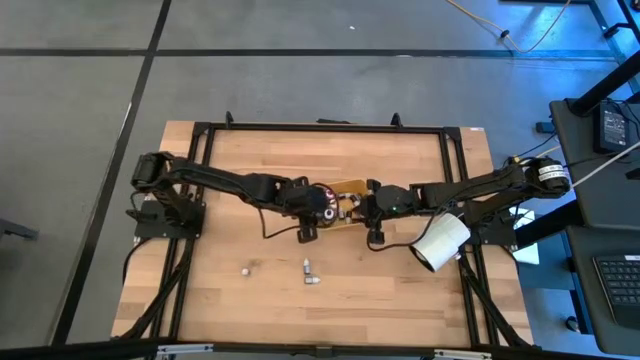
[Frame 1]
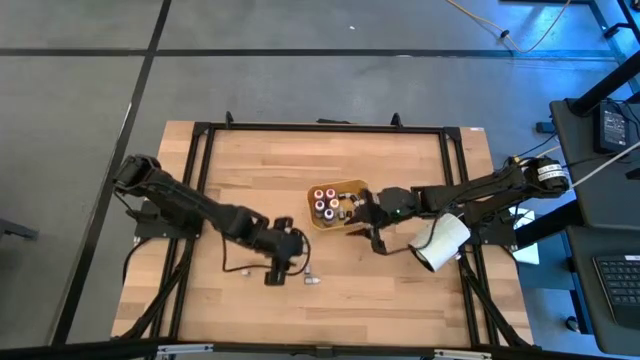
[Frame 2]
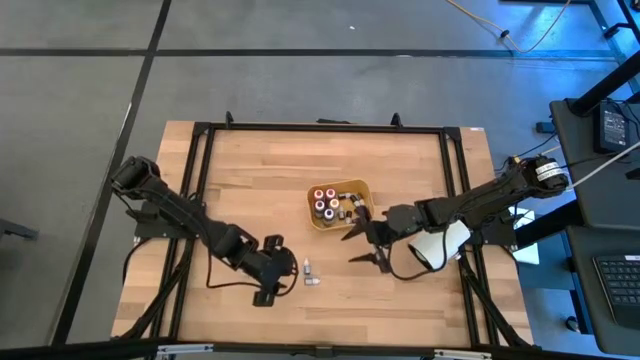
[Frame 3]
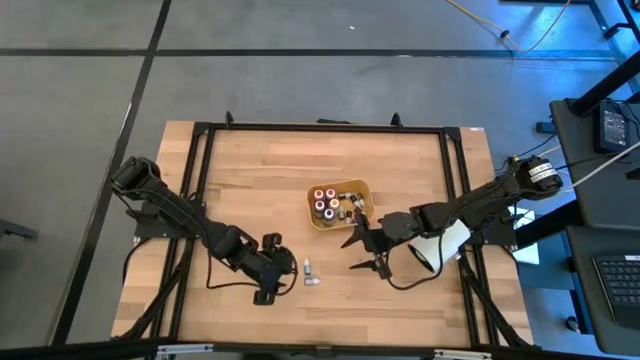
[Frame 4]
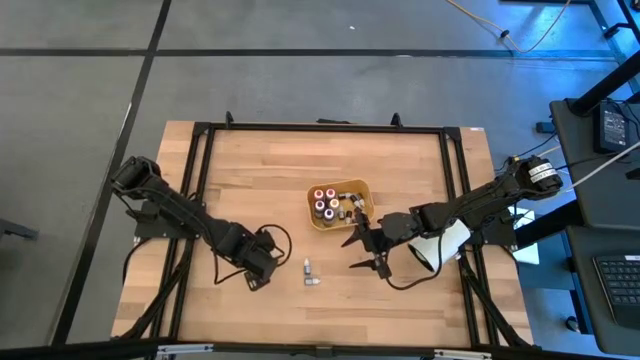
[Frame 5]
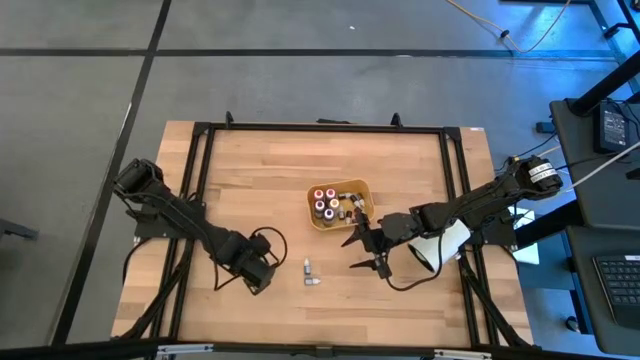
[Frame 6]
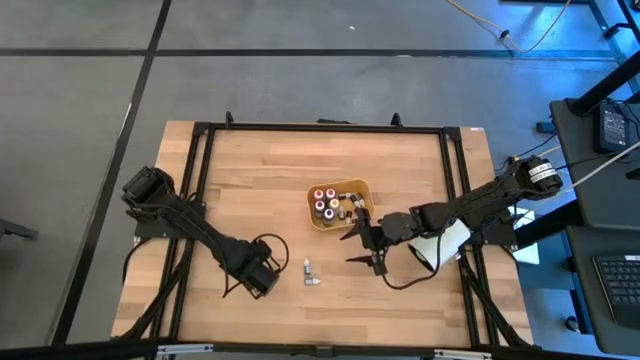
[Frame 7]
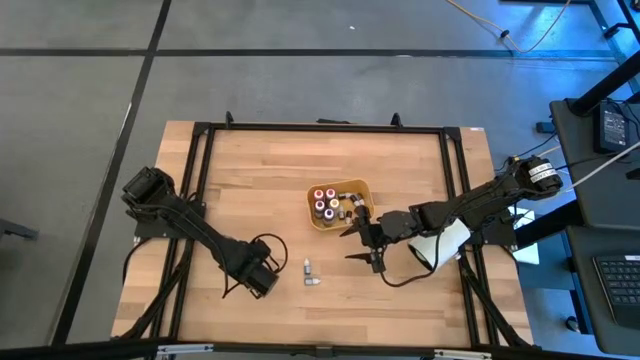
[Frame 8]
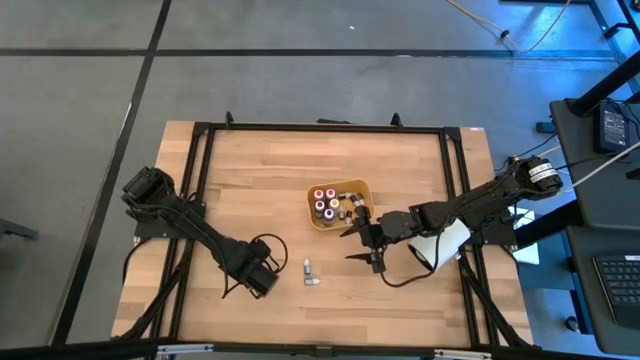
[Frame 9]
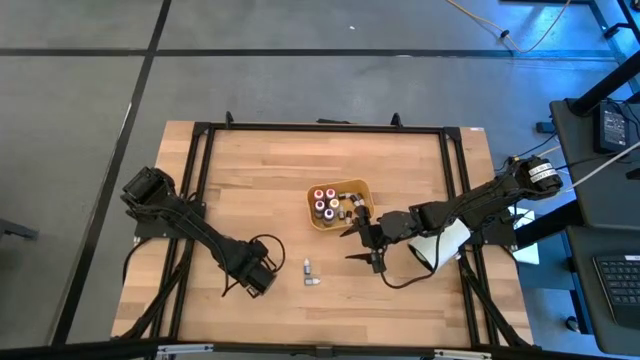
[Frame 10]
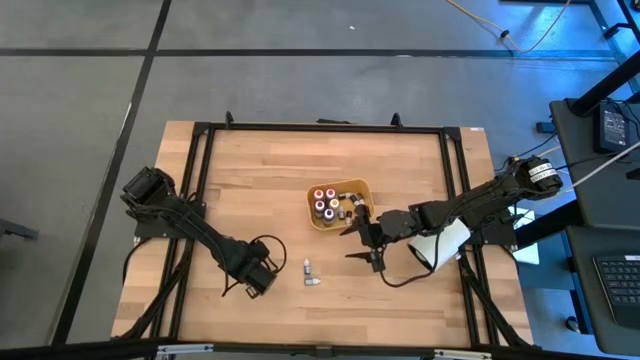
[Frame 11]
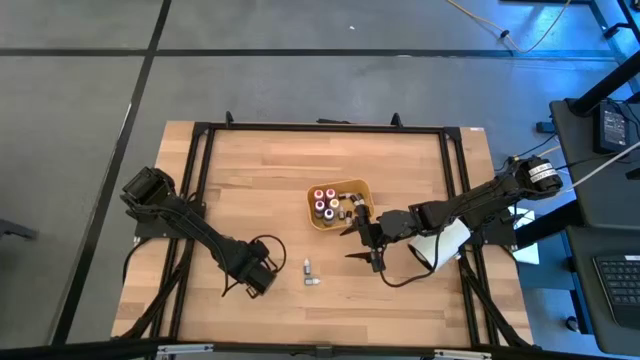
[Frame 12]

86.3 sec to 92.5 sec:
Task: Pick & Place food coloring
Put the small black food coloring bottle into the yellow bin

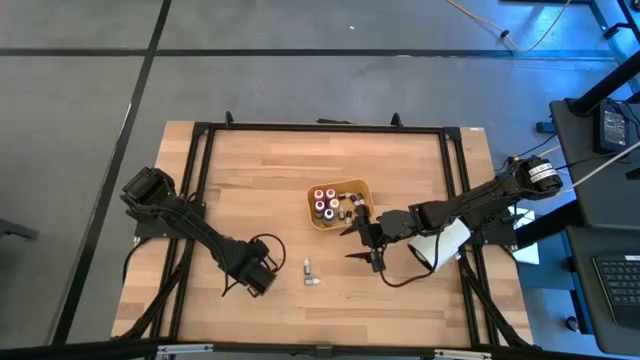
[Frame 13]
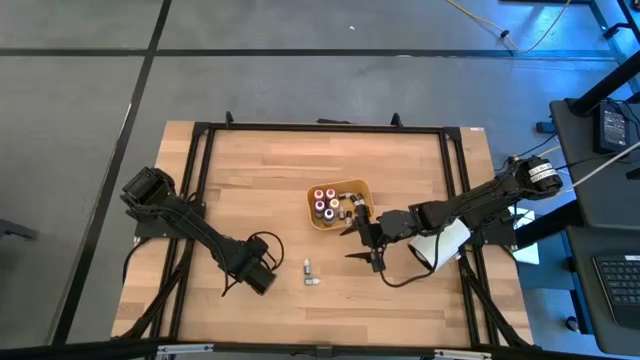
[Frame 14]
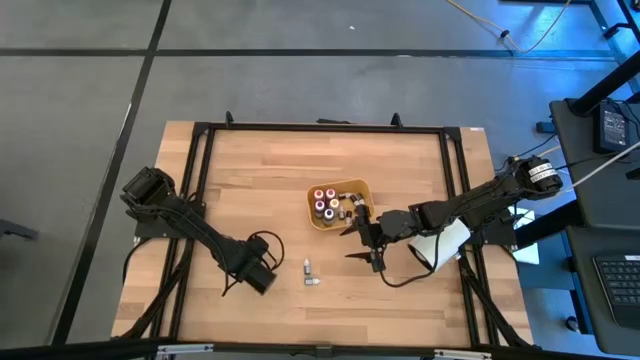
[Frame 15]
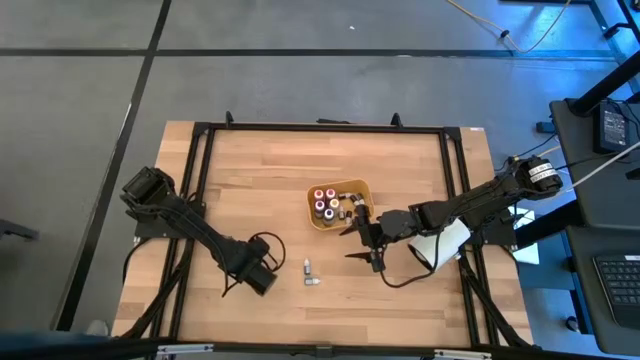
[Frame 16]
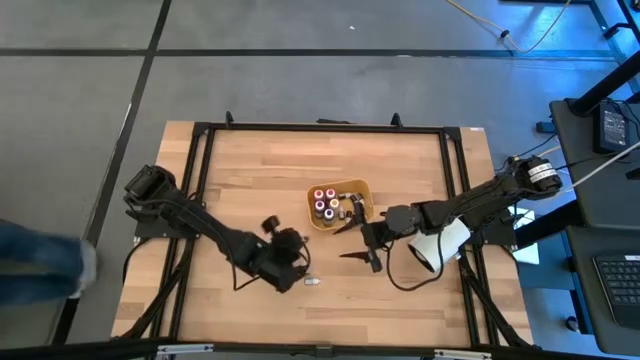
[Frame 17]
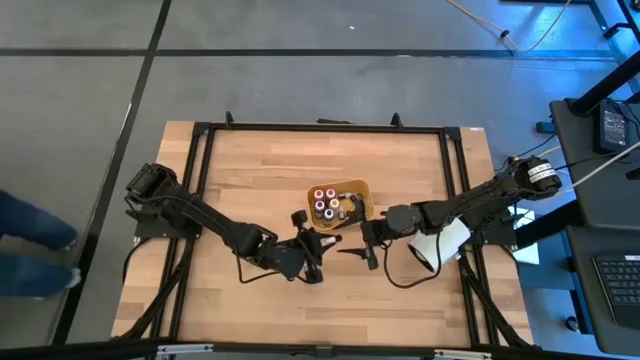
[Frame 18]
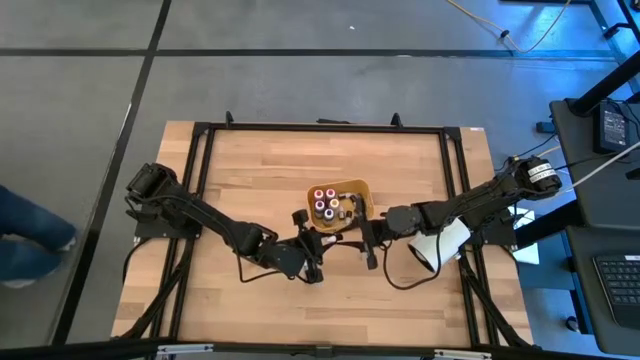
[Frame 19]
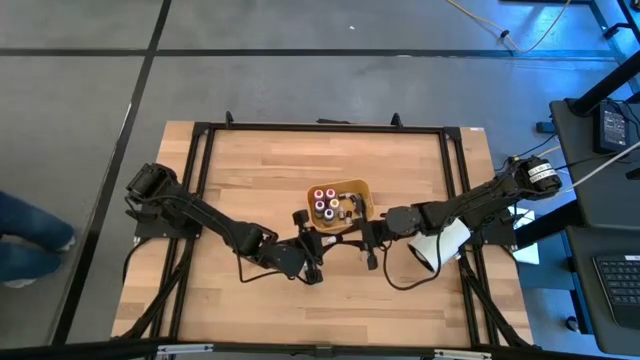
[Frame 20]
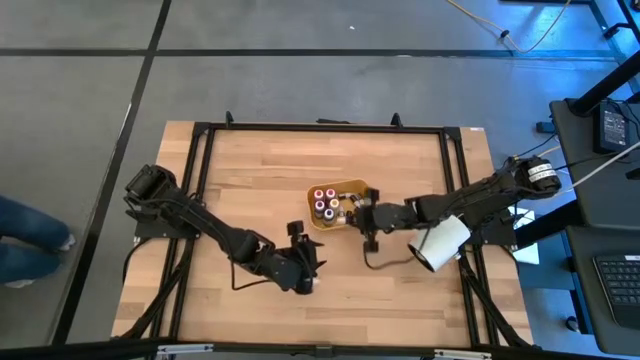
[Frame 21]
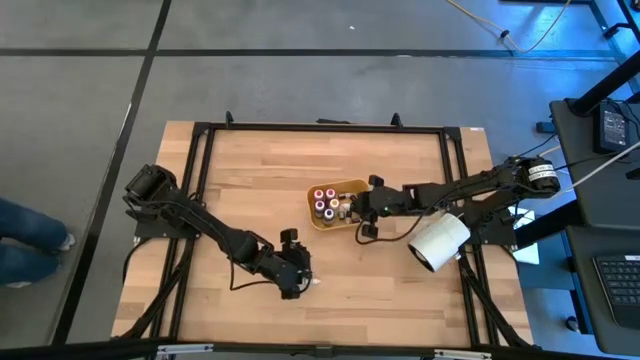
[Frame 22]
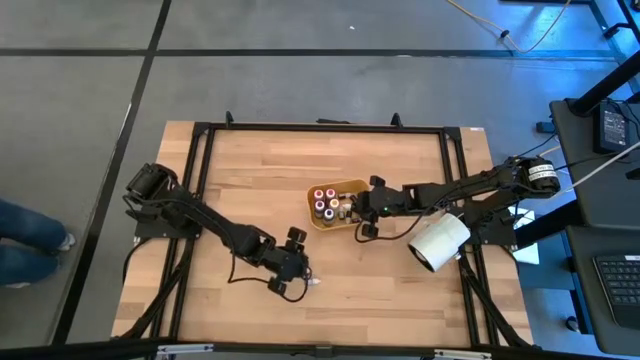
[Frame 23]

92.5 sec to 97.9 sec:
Put the small red food coloring bottle into the yellow bin

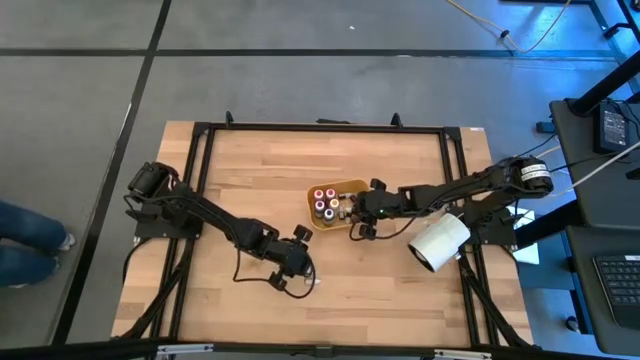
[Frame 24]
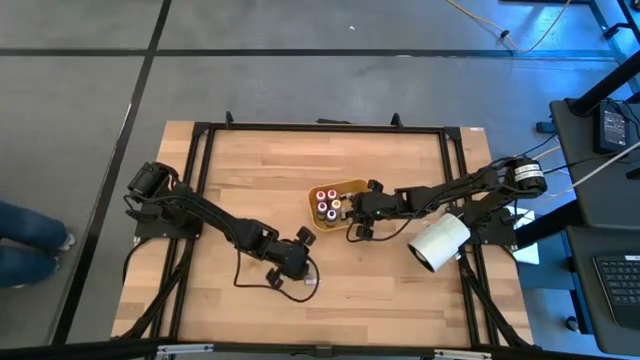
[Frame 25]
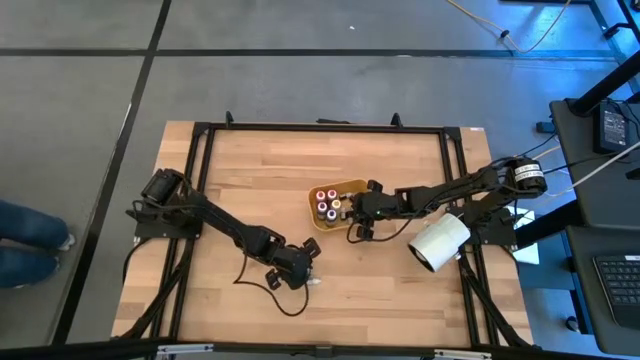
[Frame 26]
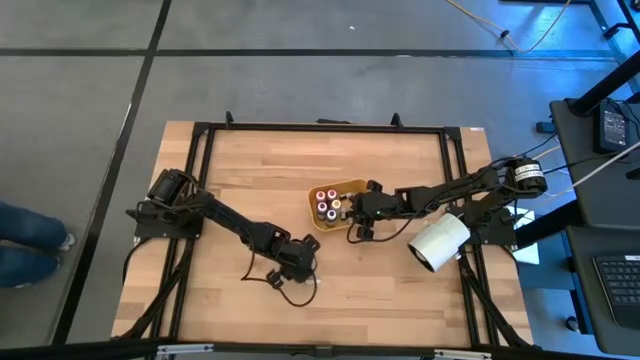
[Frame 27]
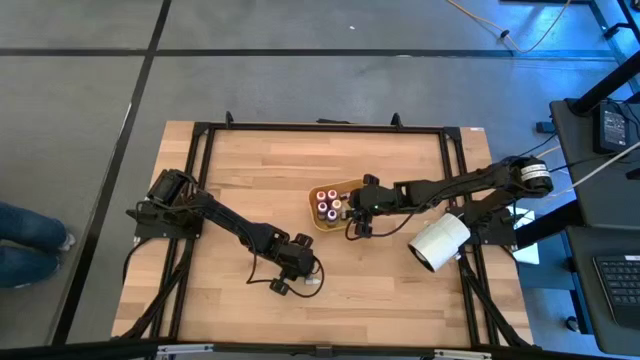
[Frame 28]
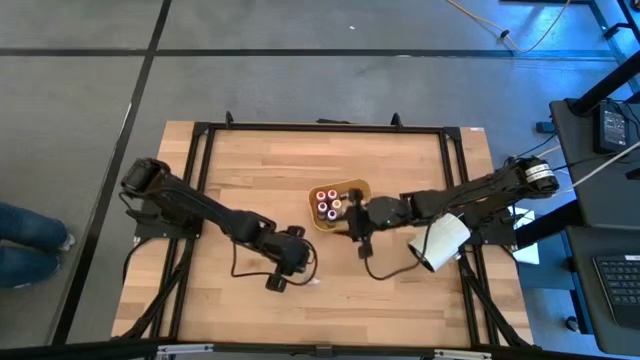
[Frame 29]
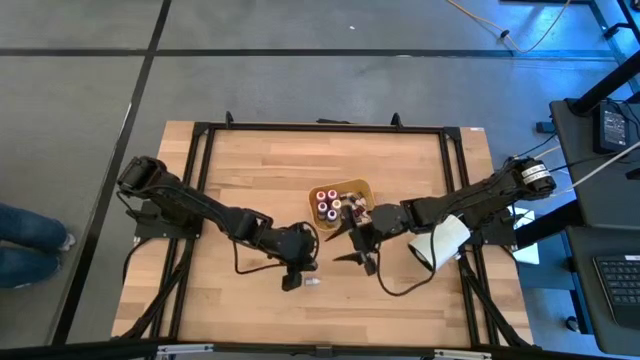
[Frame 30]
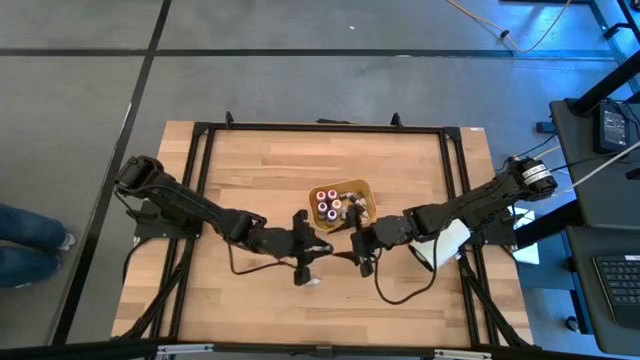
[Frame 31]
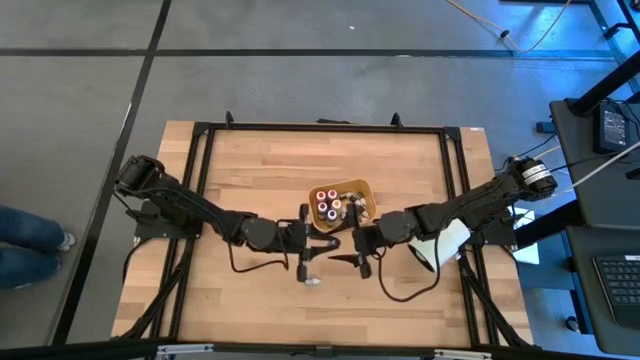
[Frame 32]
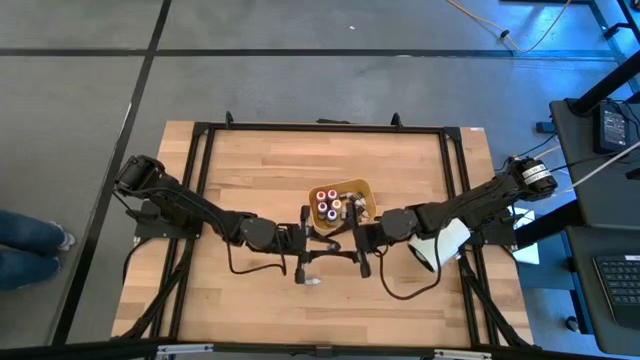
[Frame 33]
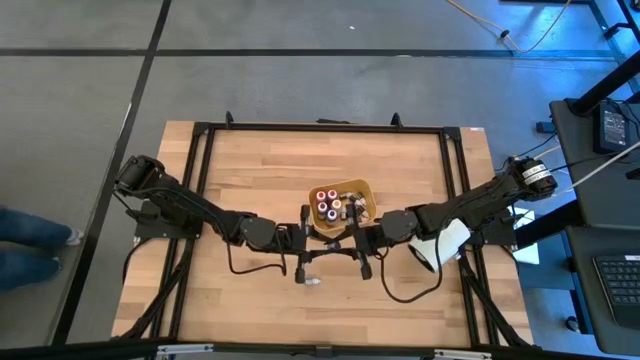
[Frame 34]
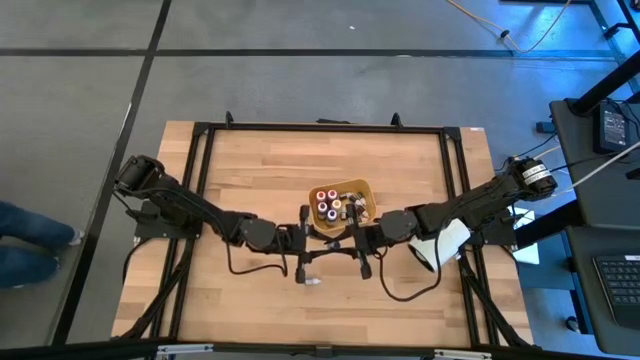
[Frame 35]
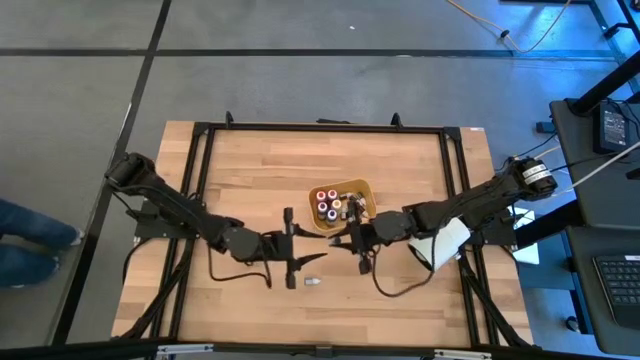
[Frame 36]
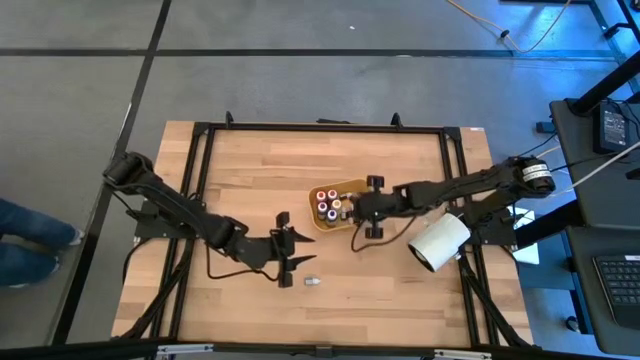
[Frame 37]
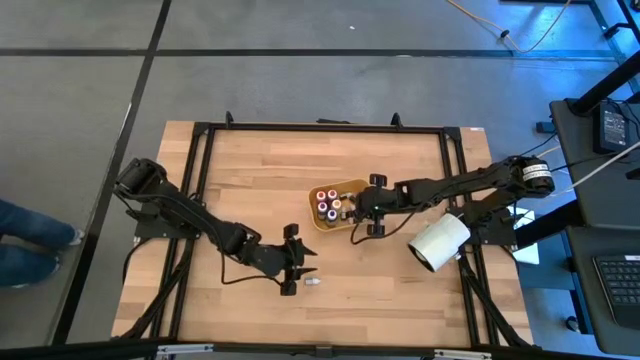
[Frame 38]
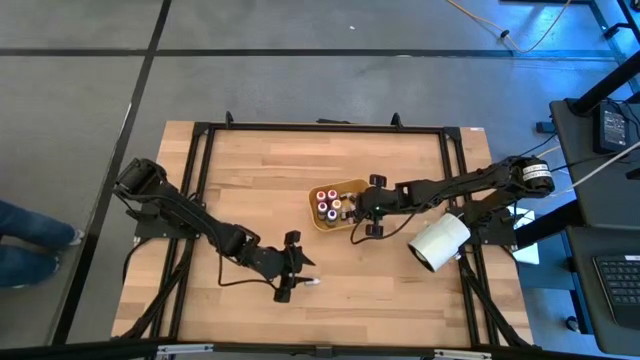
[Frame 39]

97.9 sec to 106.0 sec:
Put the small blue food coloring bottle into the yellow bin

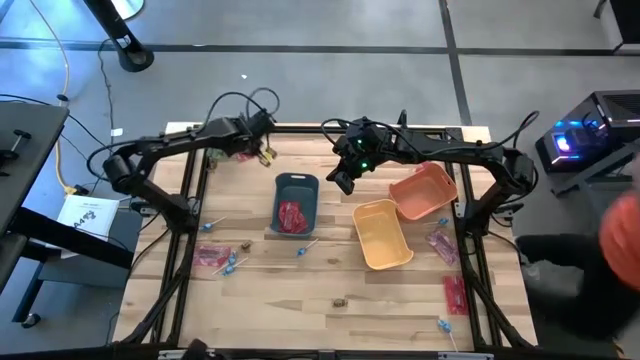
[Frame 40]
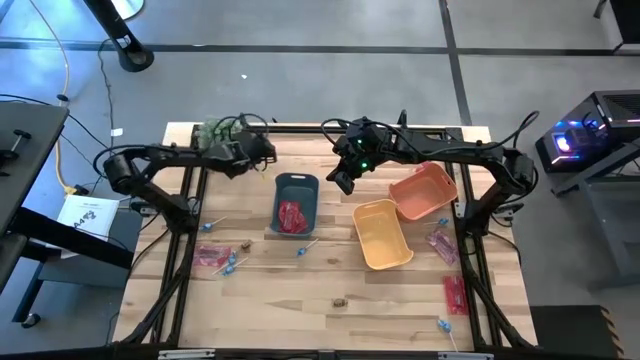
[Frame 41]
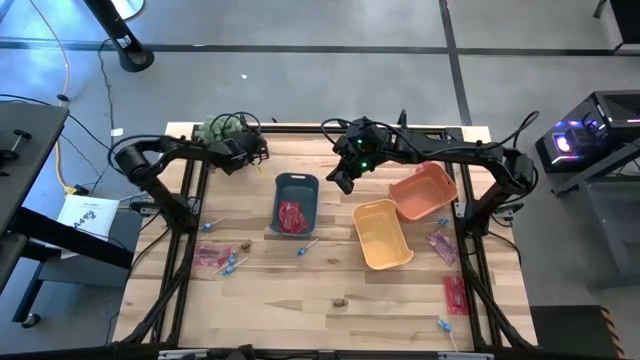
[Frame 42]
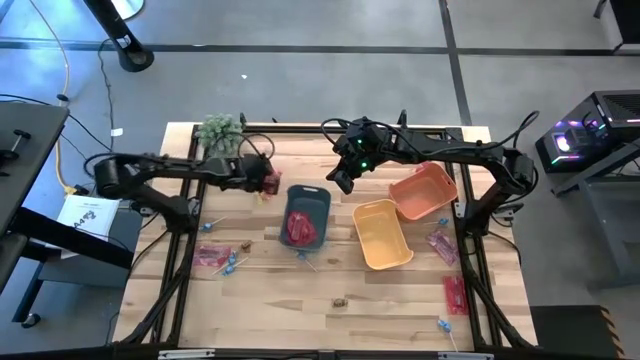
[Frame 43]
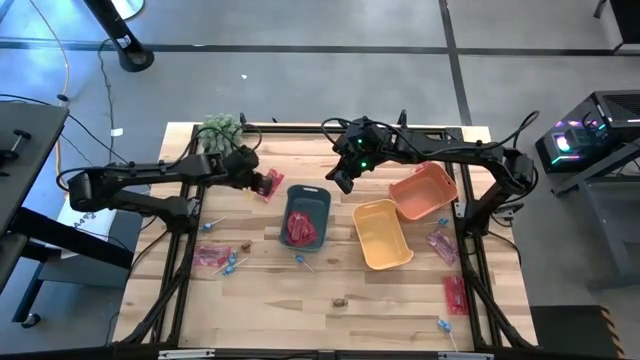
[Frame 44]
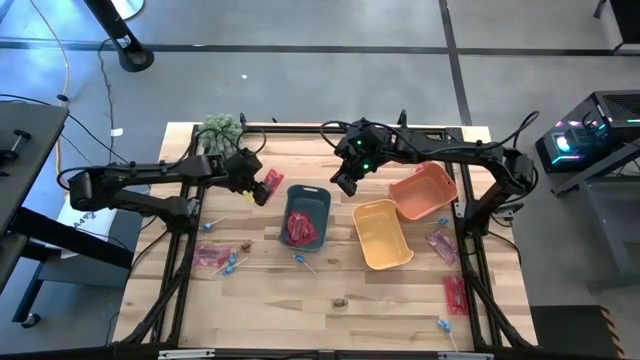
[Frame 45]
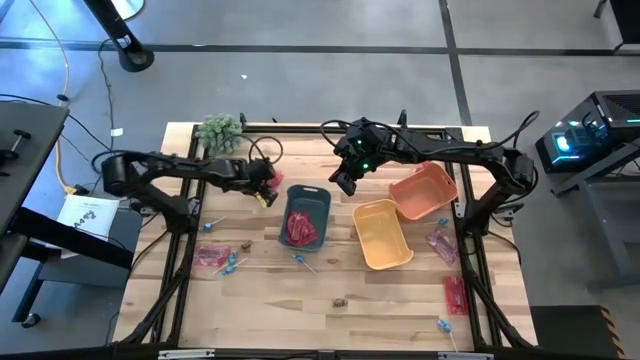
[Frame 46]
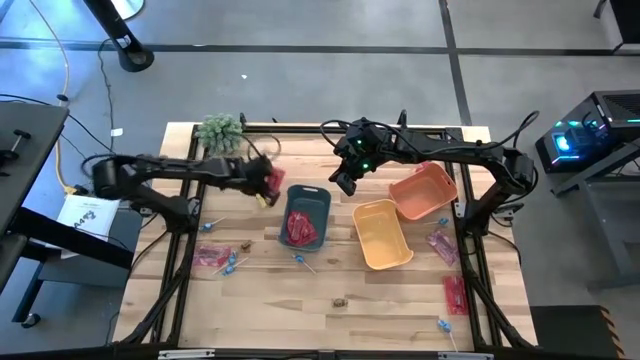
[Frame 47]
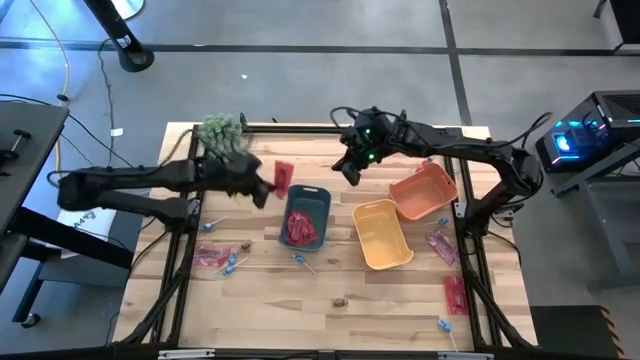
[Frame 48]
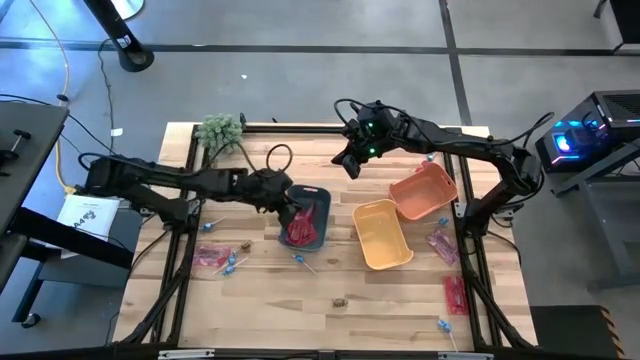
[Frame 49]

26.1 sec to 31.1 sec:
Task: Sort candy
Put the red candy pack into the blue bin
